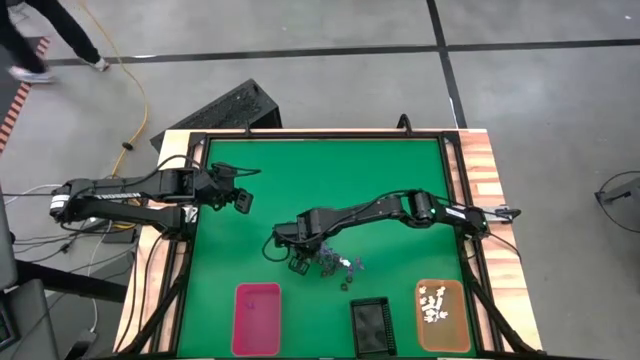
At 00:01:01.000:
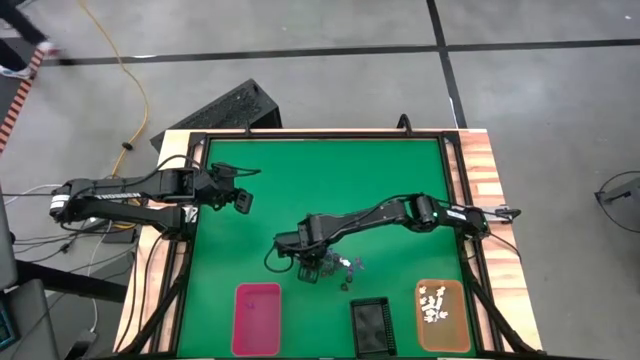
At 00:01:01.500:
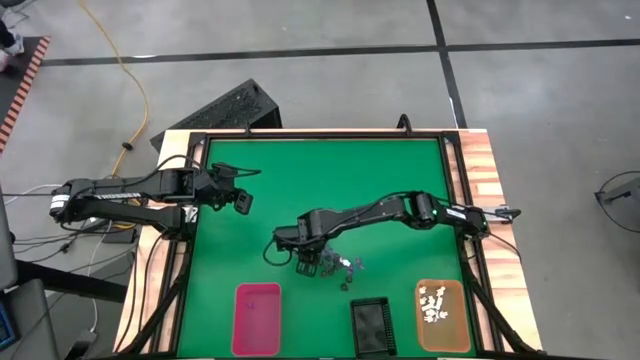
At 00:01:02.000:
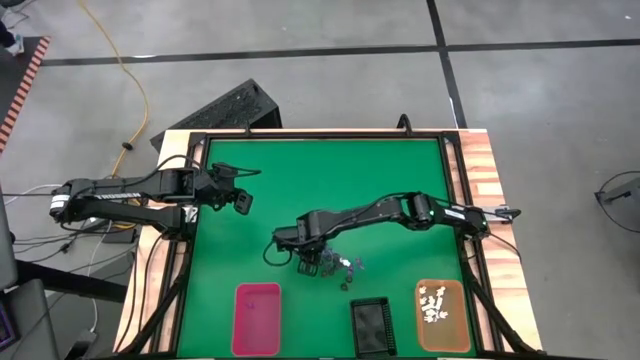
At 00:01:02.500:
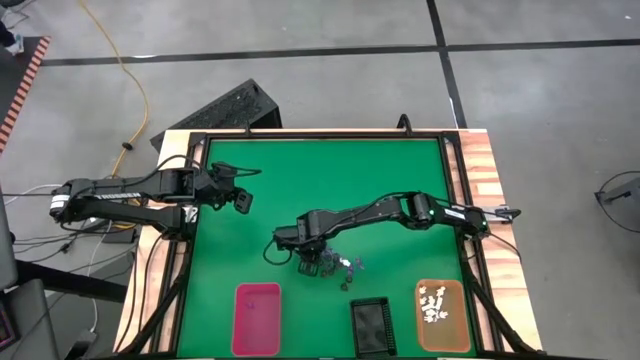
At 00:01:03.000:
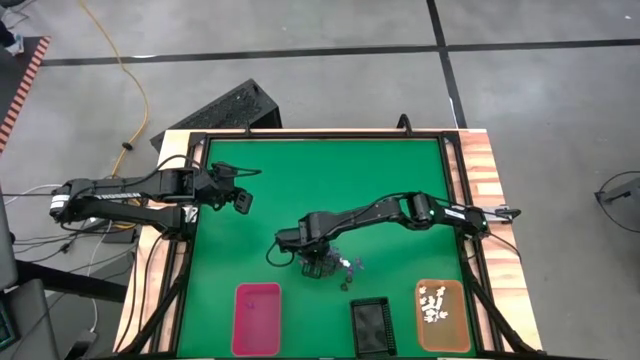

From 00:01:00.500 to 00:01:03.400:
Task: Sort Halloween decoration
Put the violet witch hat toy into the red organizing bin

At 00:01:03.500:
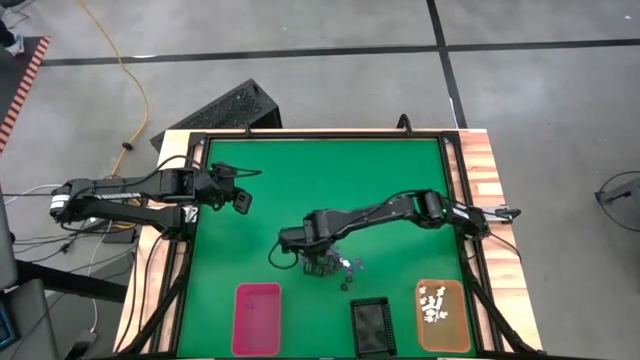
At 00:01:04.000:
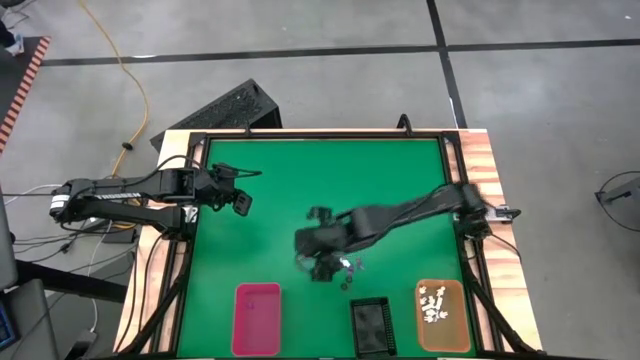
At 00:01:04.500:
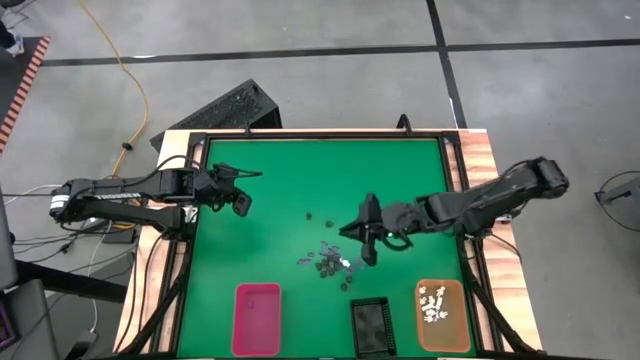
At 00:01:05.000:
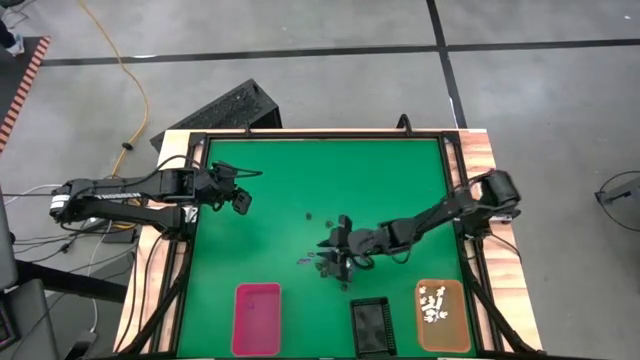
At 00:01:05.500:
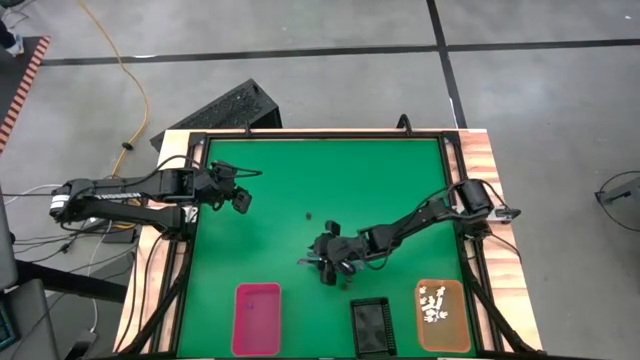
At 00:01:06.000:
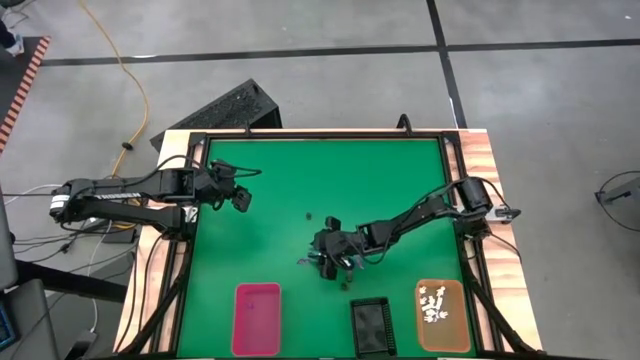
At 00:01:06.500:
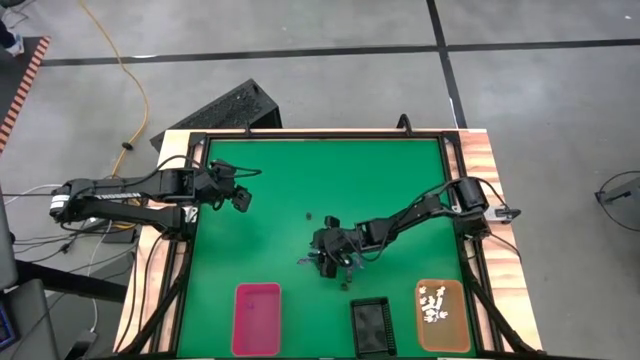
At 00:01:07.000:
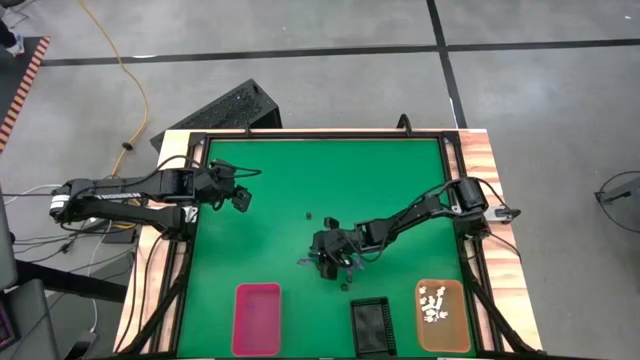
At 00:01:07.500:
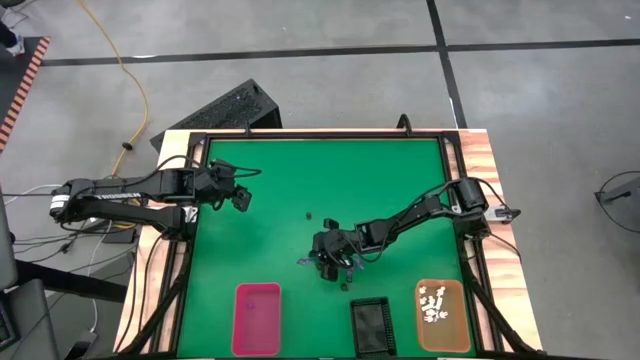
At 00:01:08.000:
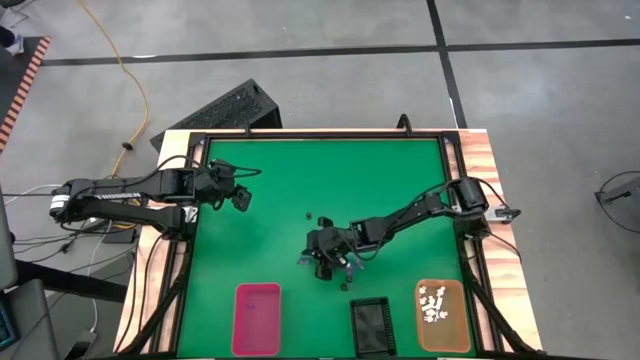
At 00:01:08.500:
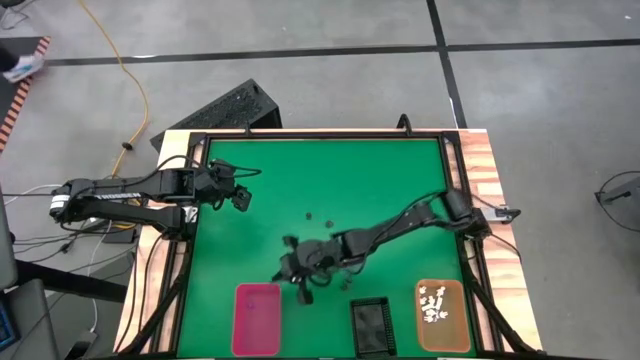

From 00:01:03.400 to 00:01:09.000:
Put the violet witch hat toy into the red organizing bin

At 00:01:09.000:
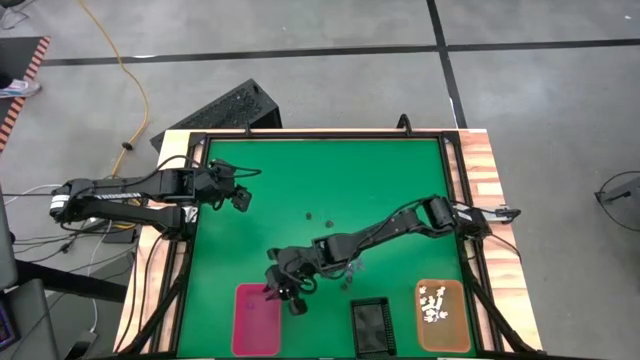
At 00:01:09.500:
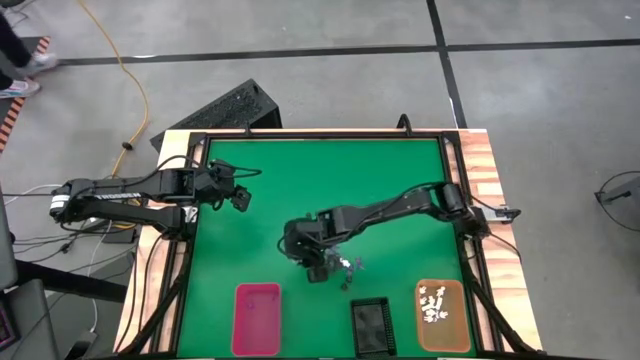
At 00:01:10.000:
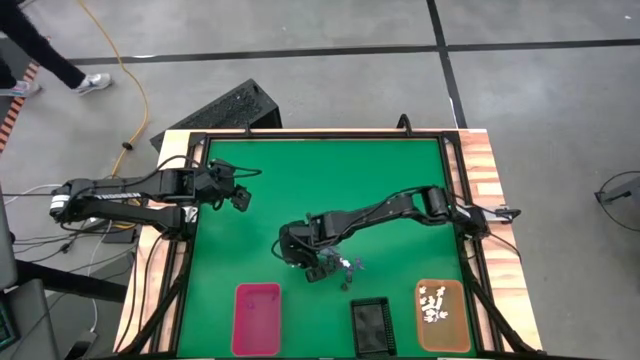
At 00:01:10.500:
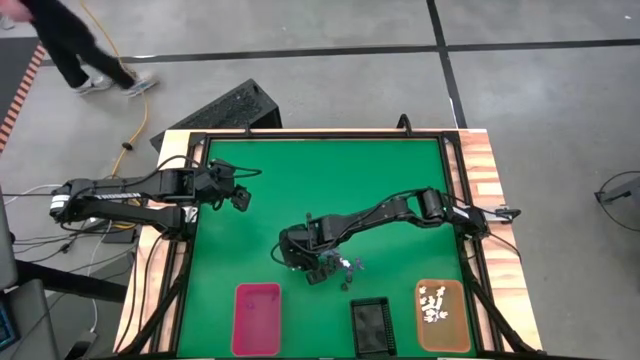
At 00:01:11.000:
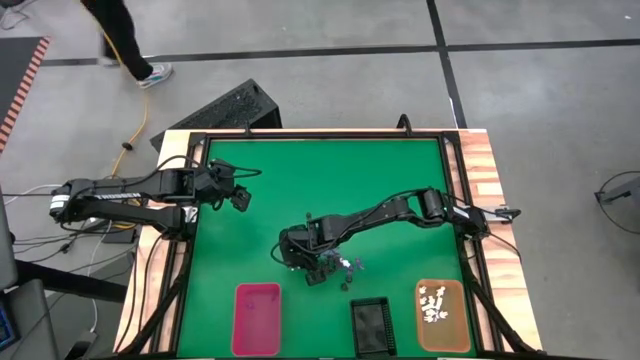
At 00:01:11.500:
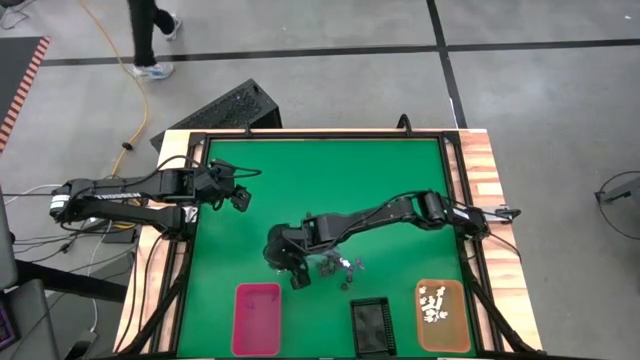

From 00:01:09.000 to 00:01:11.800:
Put the violet witch hat toy into the red organizing bin

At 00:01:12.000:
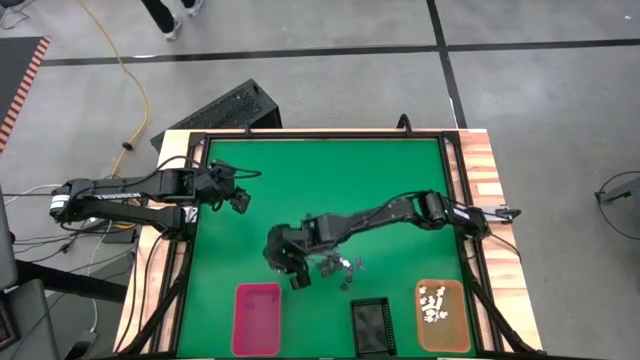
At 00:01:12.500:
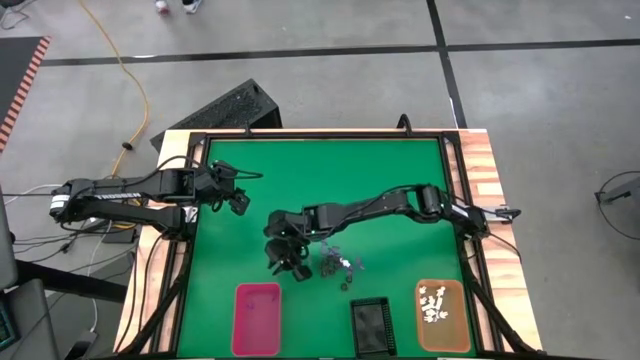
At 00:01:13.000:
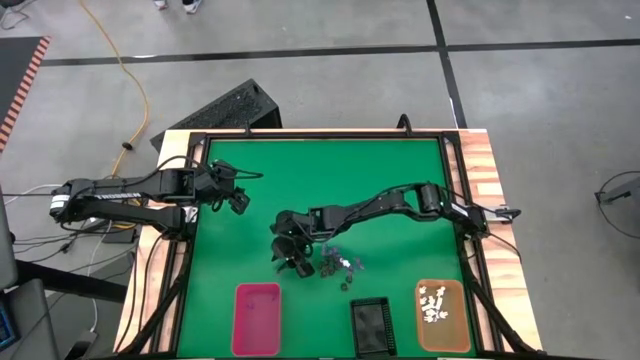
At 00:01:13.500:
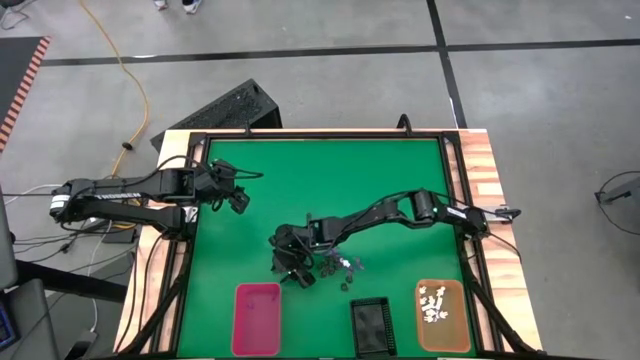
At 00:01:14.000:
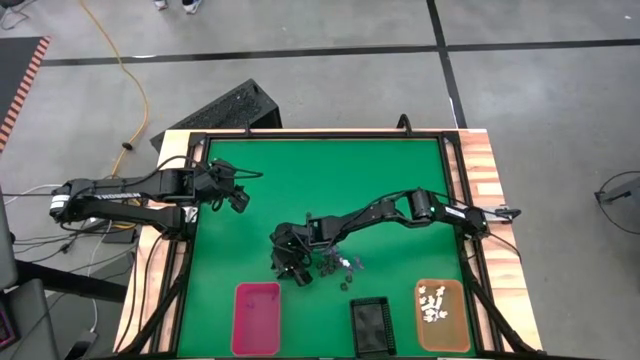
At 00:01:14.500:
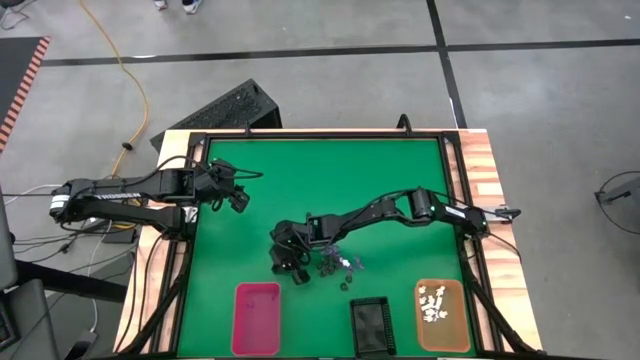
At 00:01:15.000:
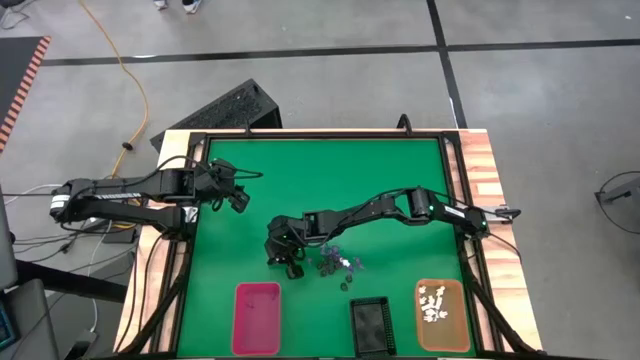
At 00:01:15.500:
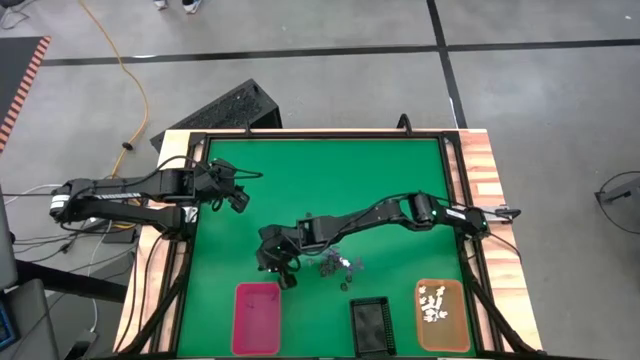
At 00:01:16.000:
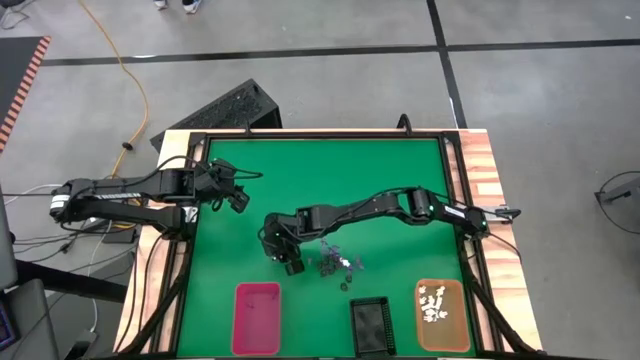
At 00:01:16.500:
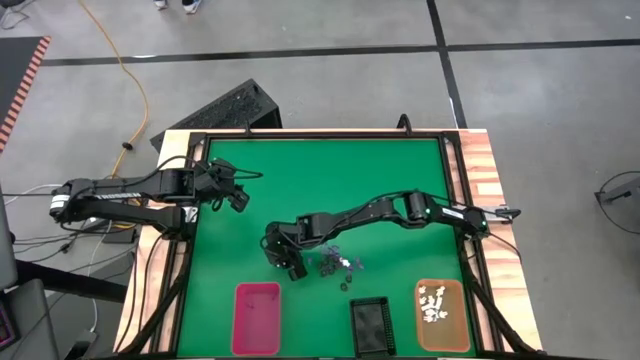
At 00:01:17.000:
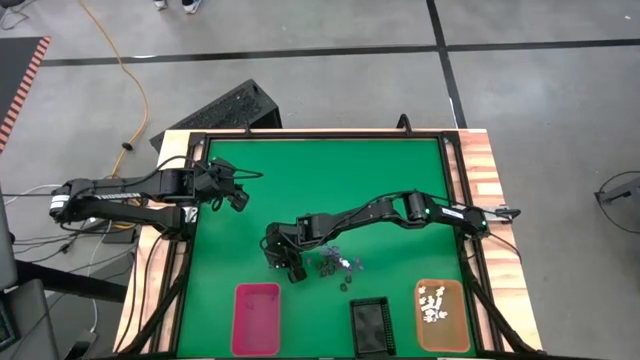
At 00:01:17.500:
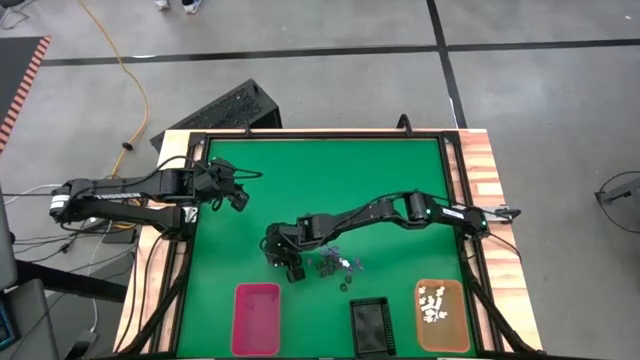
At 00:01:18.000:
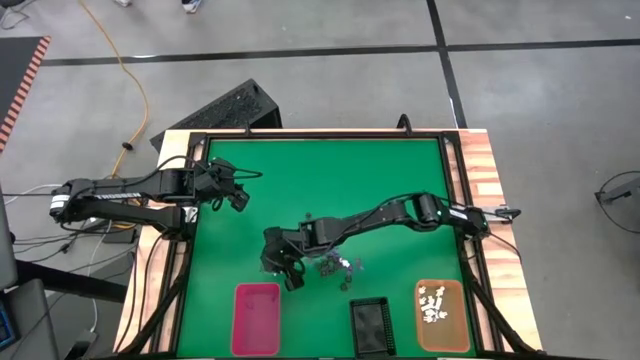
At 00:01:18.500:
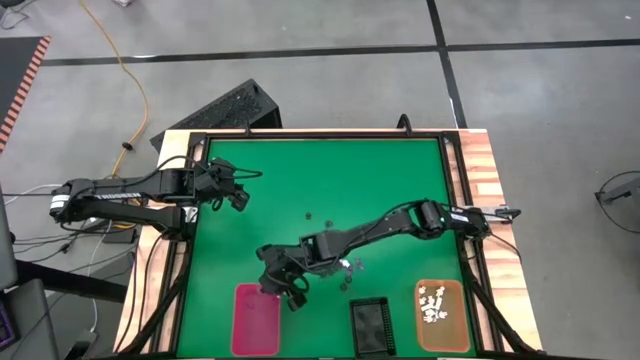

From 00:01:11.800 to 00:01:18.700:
Put the violet witch hat toy into the red organizing bin

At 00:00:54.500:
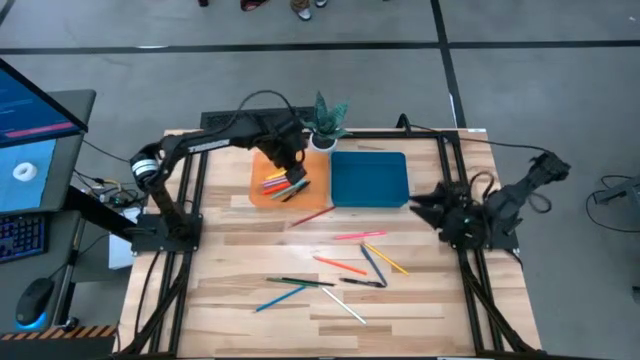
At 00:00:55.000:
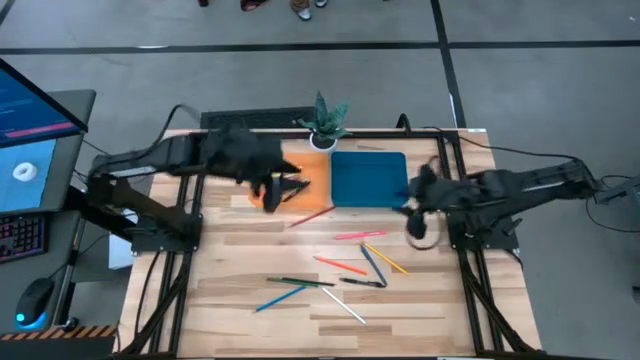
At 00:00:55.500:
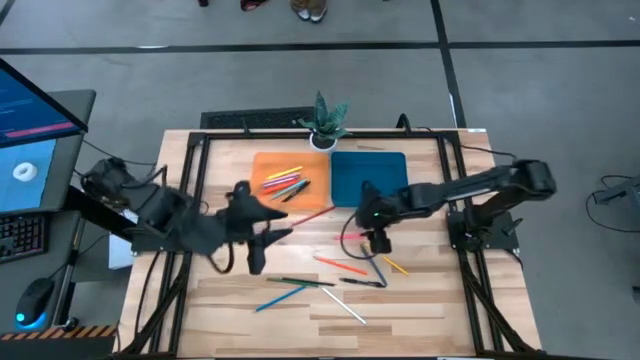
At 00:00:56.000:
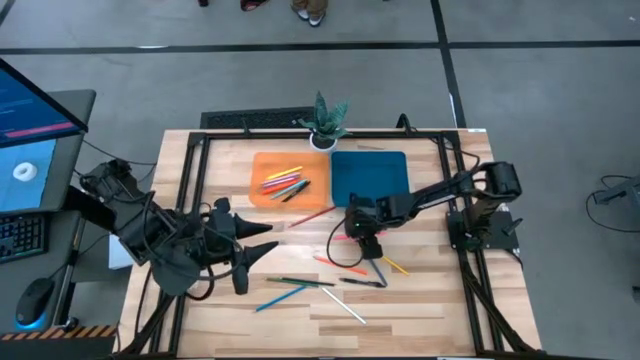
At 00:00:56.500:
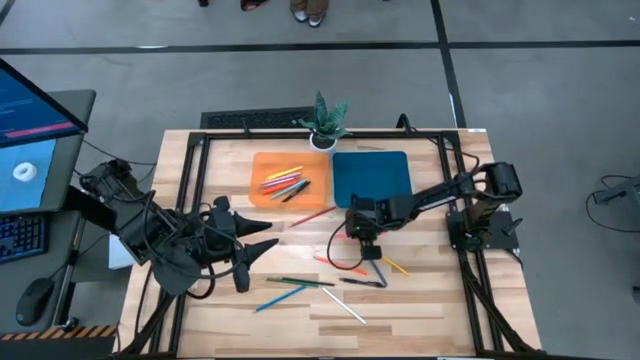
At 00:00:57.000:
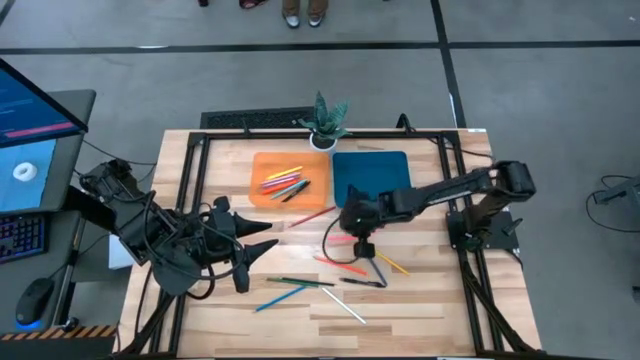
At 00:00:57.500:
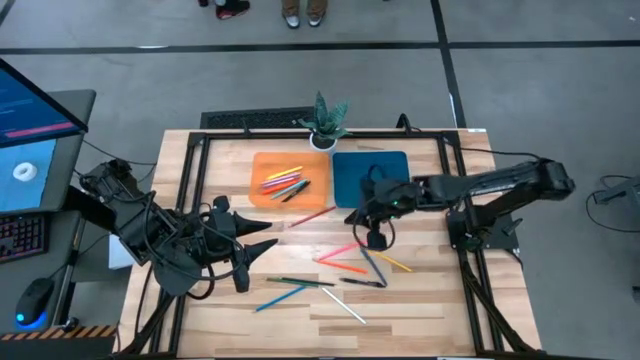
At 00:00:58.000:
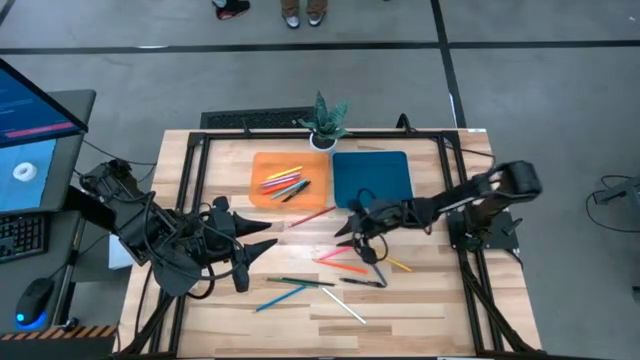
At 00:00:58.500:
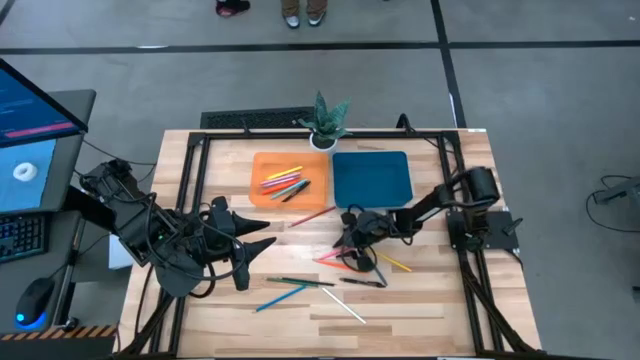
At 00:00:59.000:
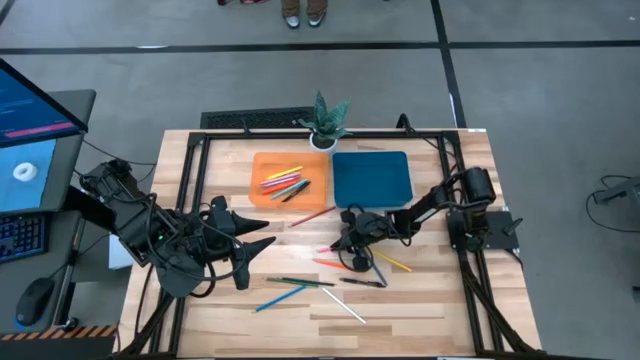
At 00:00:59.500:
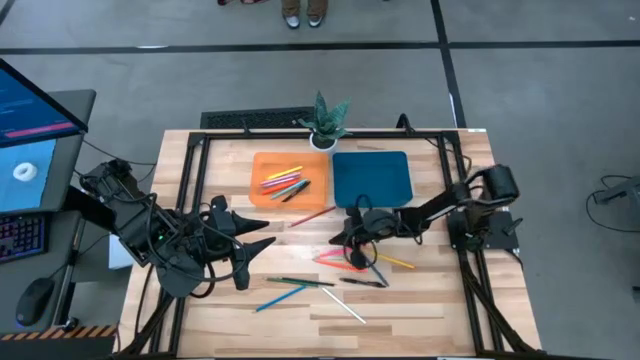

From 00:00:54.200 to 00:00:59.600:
Task: Sort pens & pencils
Put the pink pencil into the blue bin
